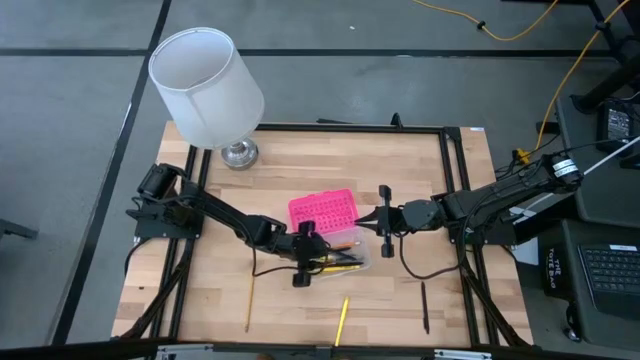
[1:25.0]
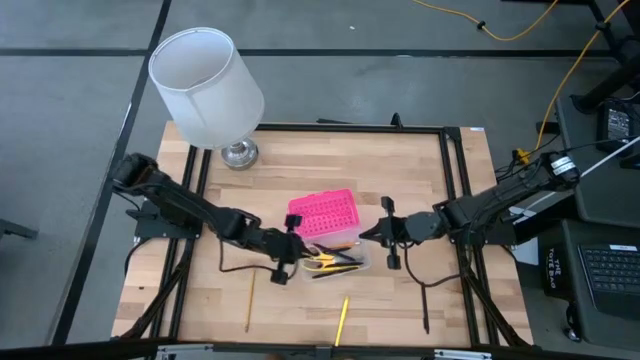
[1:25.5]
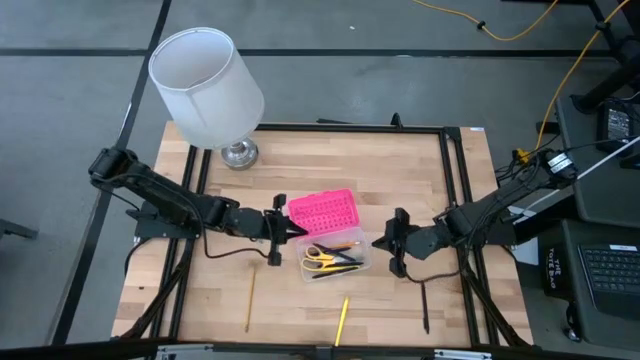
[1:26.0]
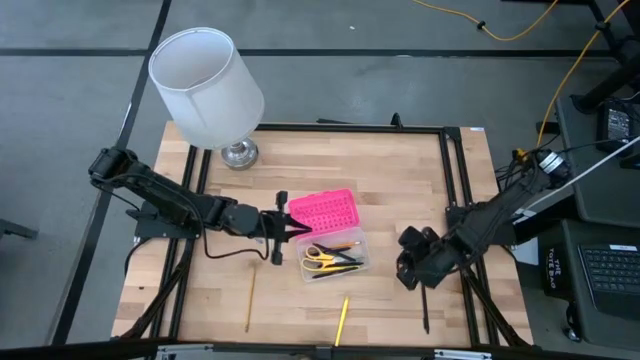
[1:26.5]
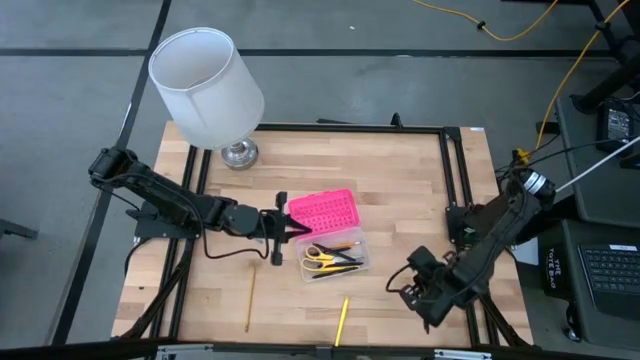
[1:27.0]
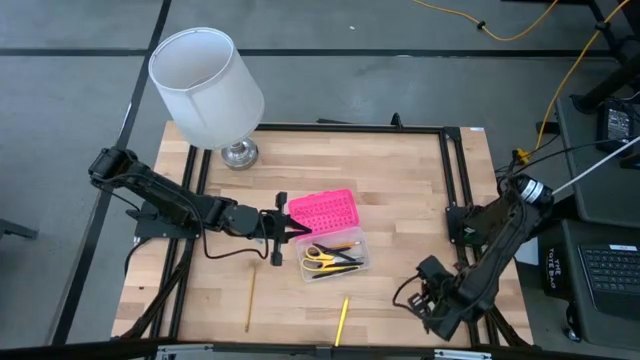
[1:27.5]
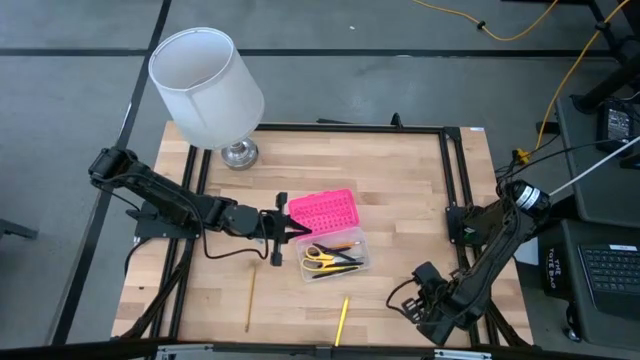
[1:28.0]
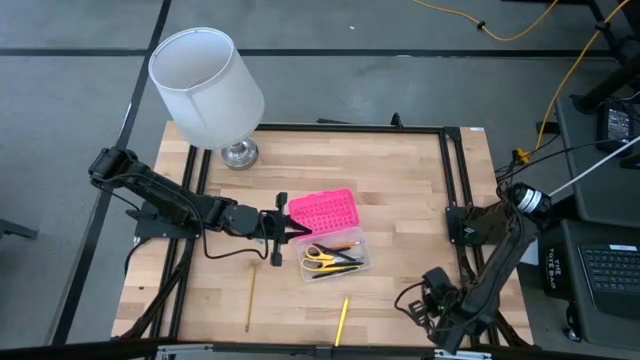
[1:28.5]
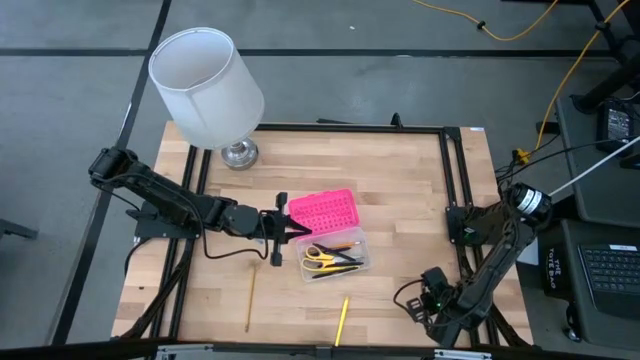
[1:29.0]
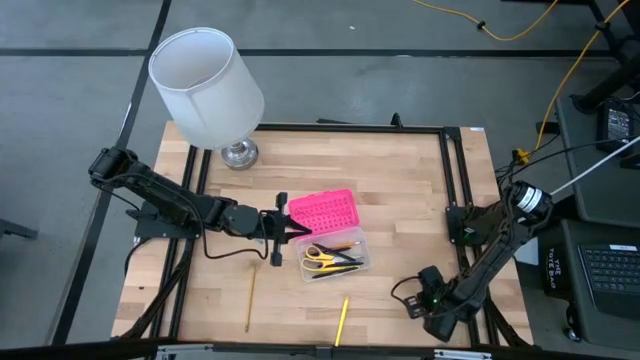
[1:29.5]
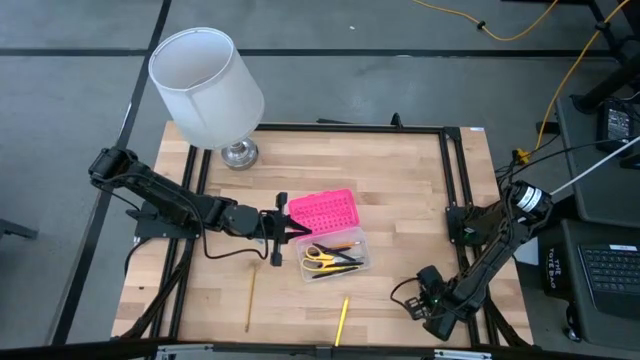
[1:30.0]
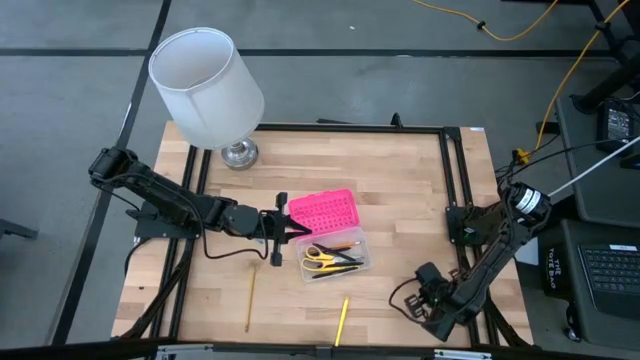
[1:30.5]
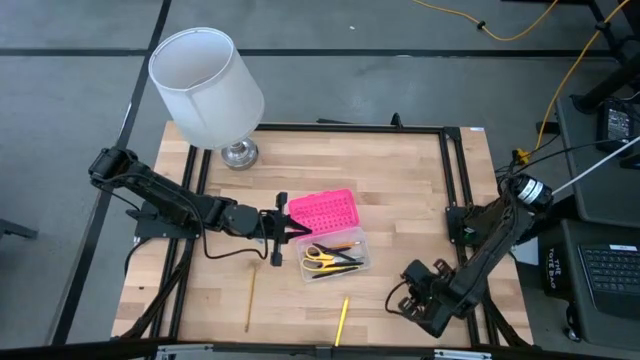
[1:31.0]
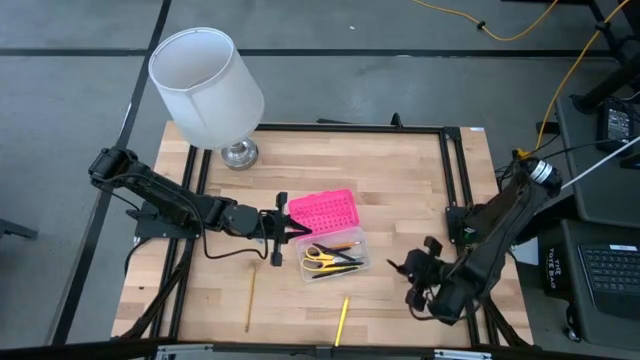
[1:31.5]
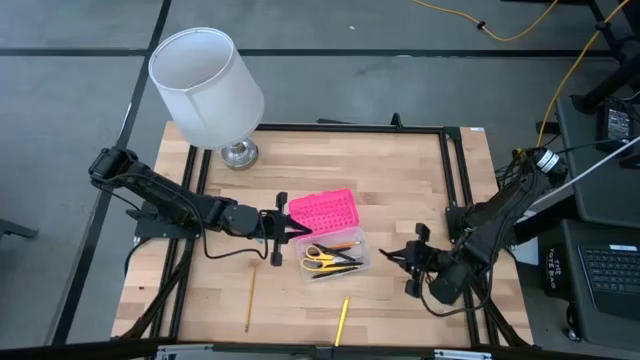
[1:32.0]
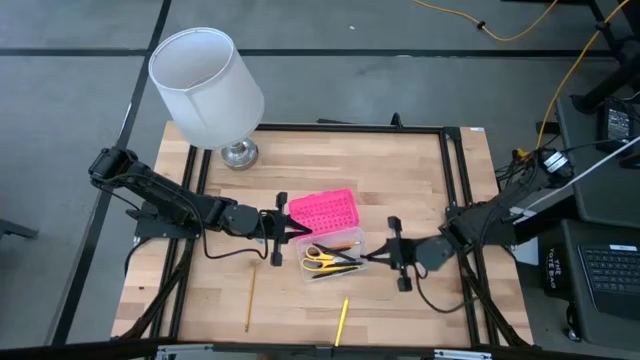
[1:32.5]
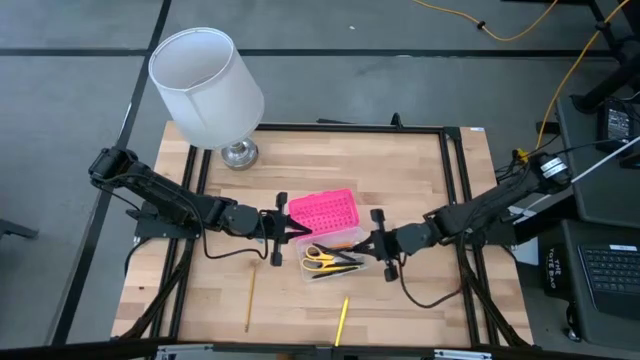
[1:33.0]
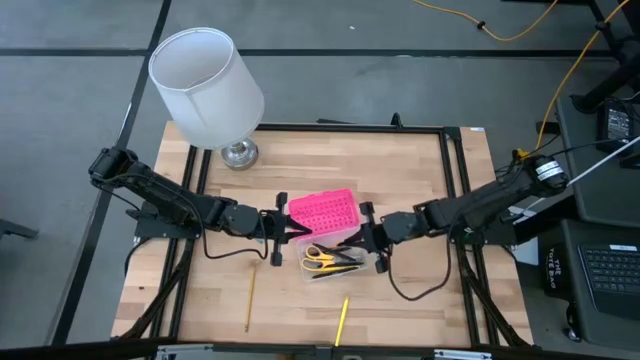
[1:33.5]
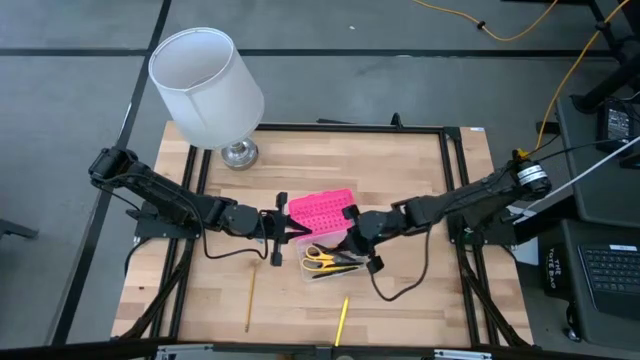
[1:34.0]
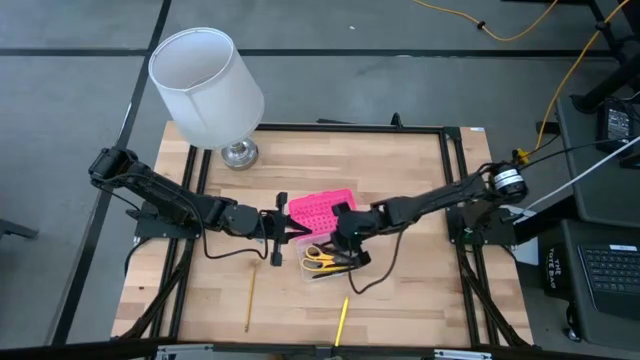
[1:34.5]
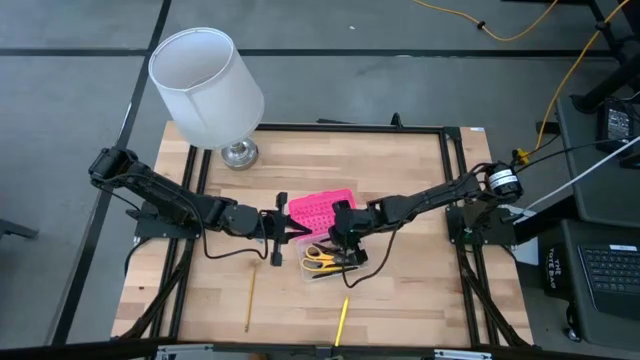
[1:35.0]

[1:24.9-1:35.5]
Task: Pick & place school supplies into a supply box
Put the black pen into the pink supply box

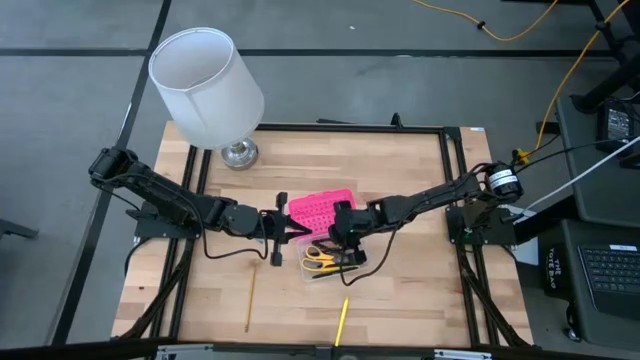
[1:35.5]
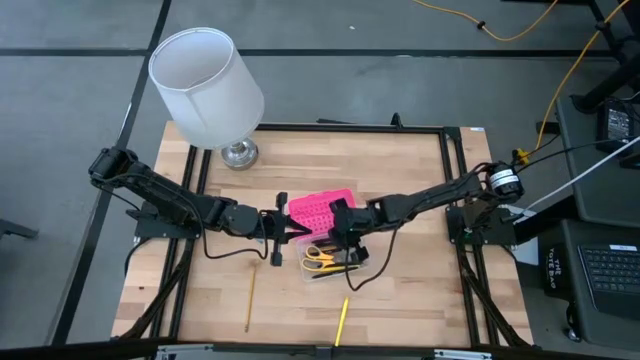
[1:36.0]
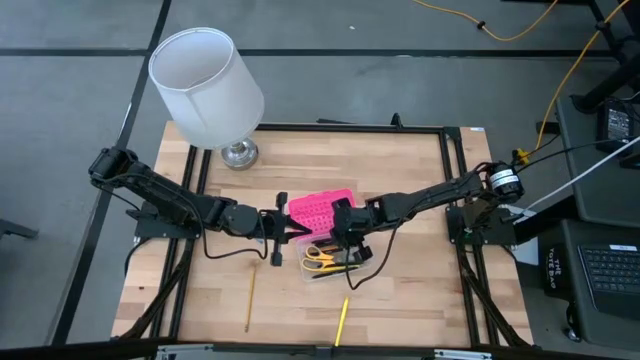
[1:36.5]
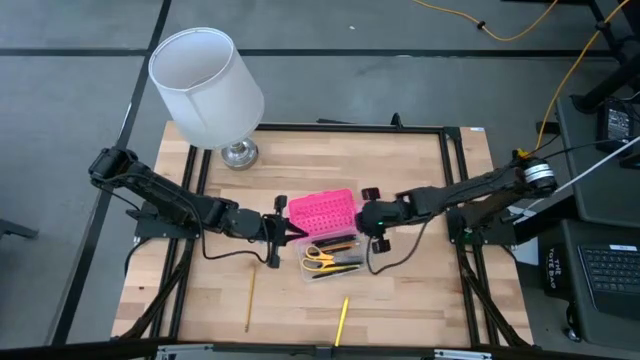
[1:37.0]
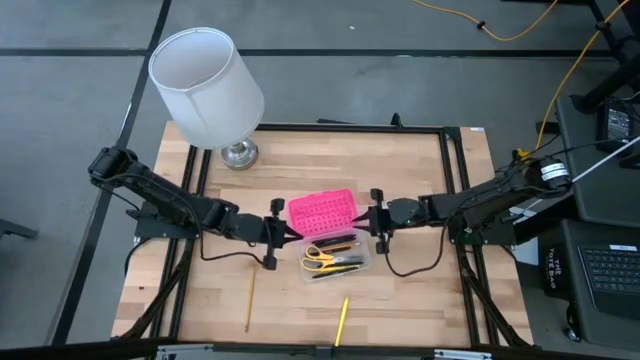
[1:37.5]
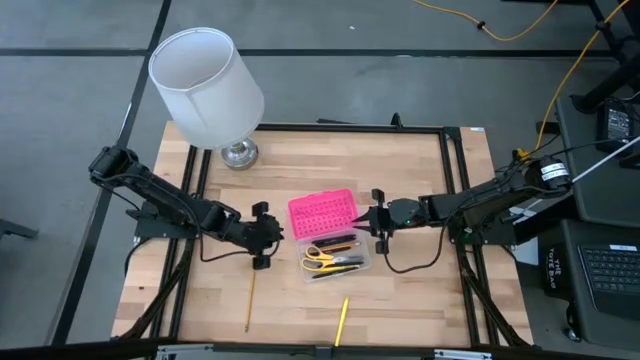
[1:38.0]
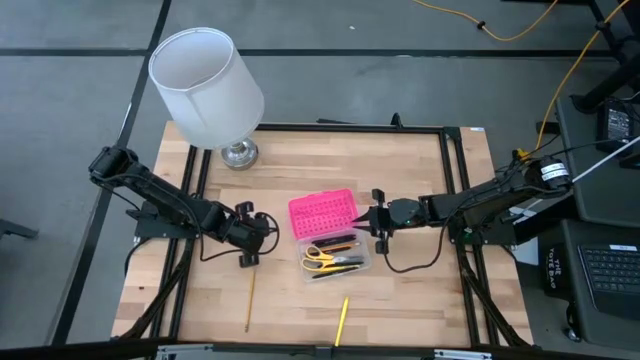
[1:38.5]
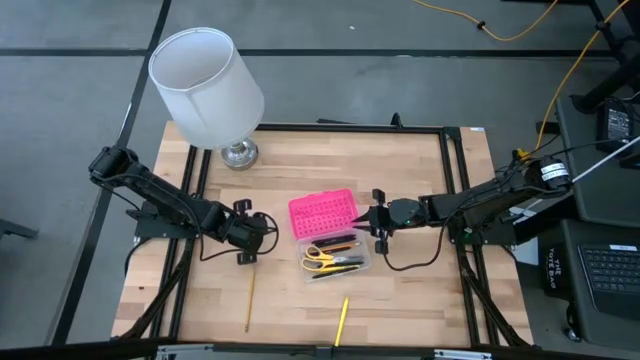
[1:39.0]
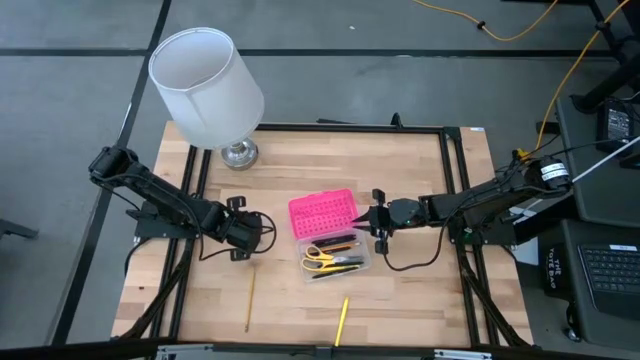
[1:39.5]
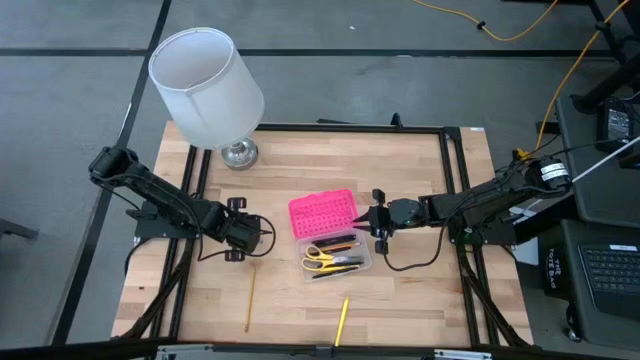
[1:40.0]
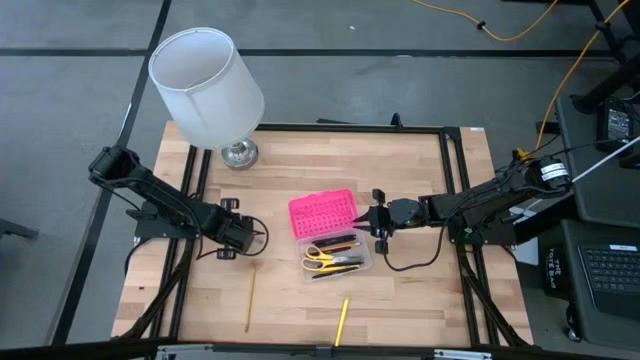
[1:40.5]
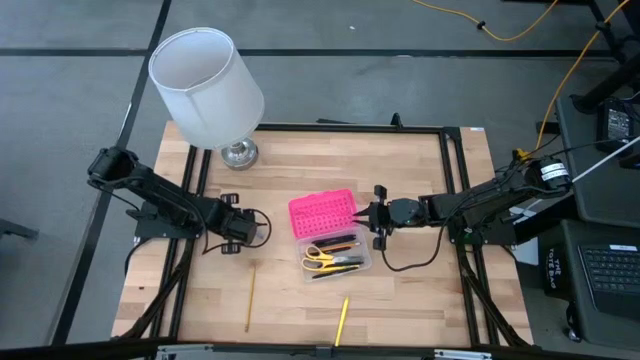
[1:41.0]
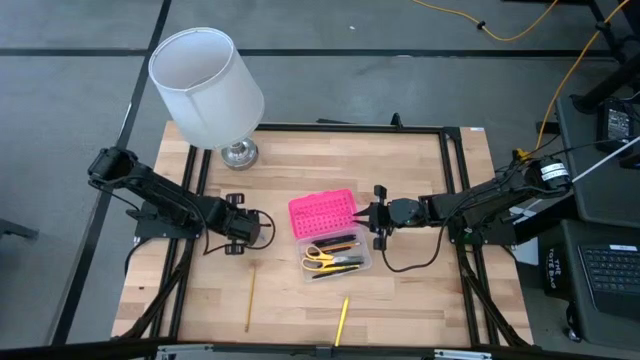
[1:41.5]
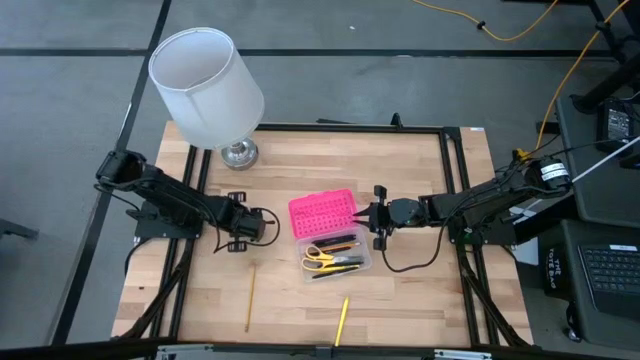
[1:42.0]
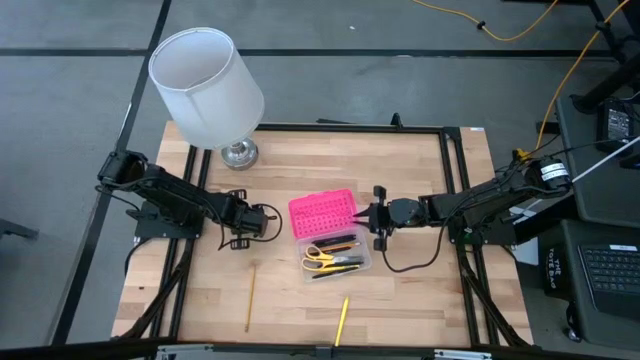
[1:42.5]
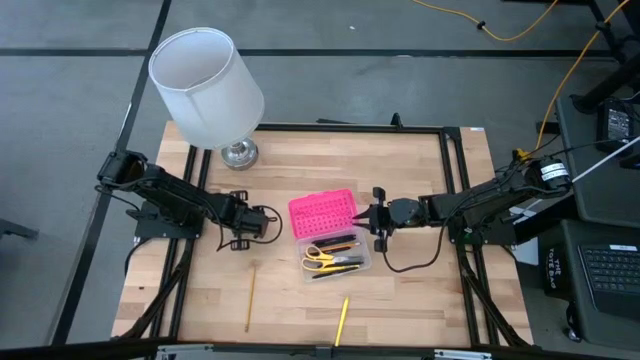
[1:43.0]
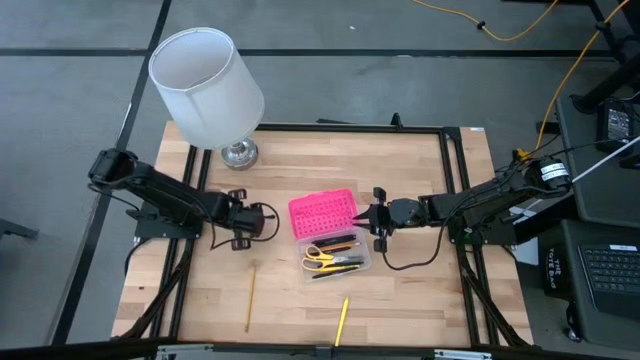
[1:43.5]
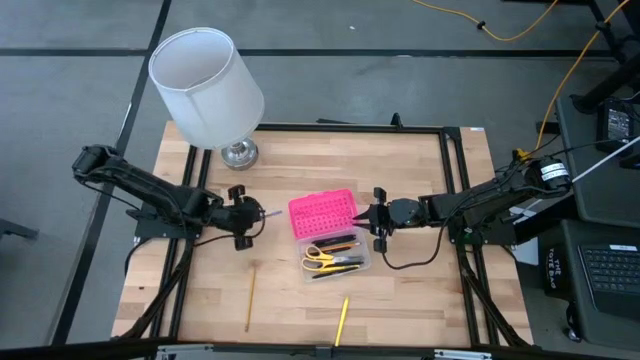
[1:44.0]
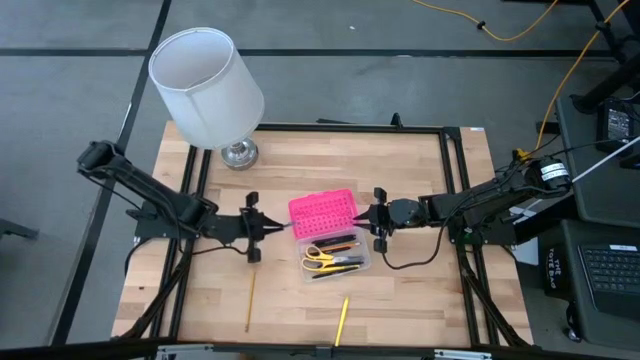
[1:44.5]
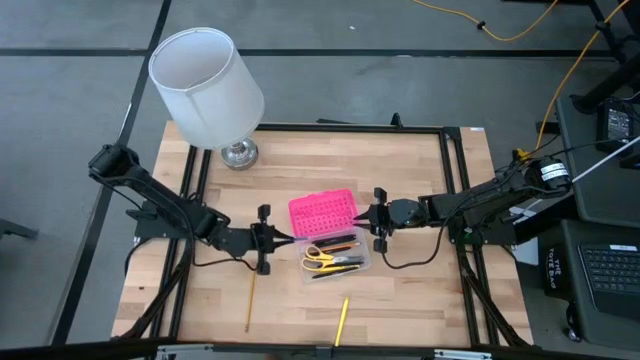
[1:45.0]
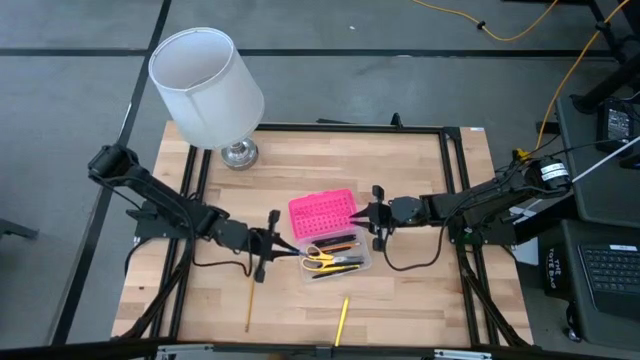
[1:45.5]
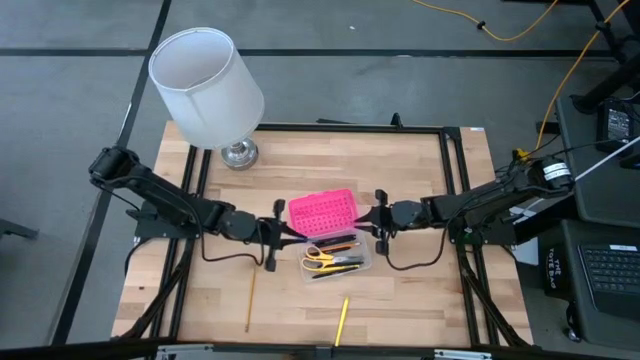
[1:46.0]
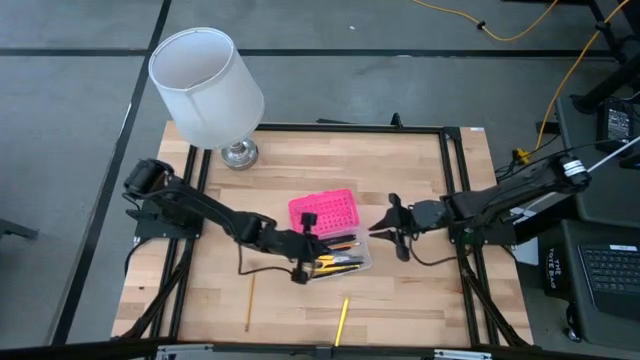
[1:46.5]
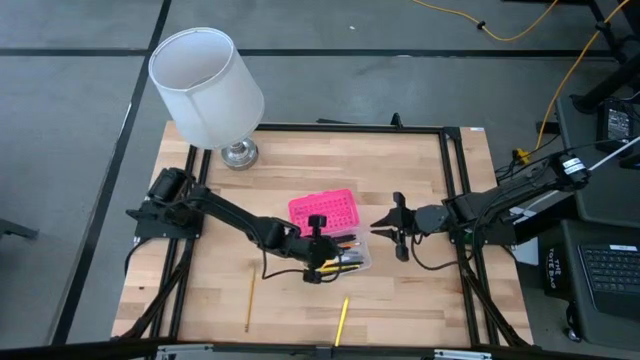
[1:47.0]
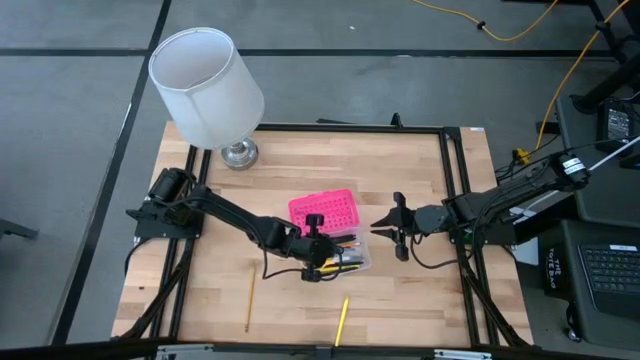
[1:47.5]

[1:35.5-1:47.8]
Put the light blue pen into the pink supply box
